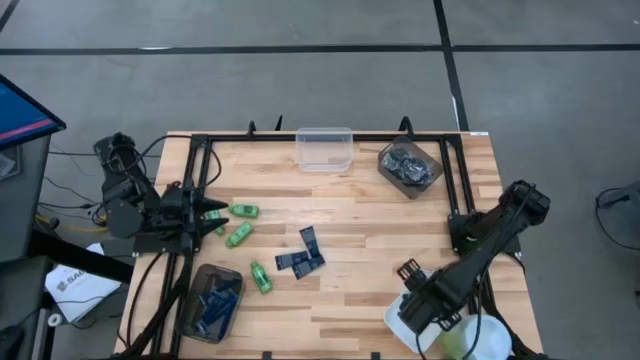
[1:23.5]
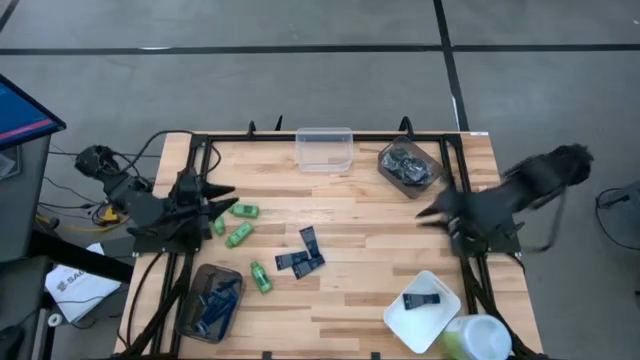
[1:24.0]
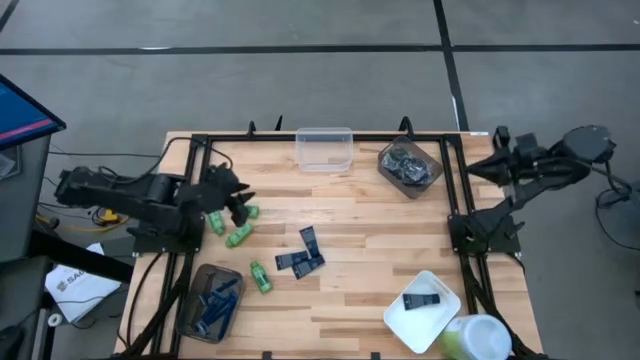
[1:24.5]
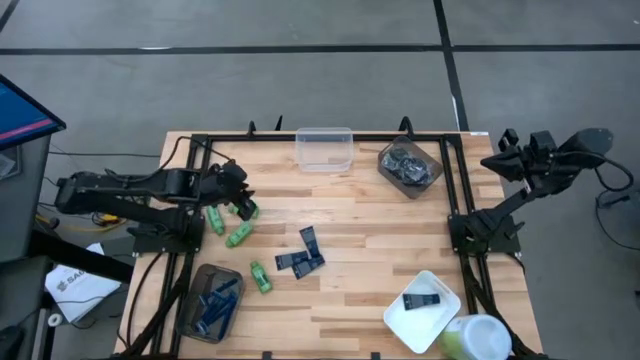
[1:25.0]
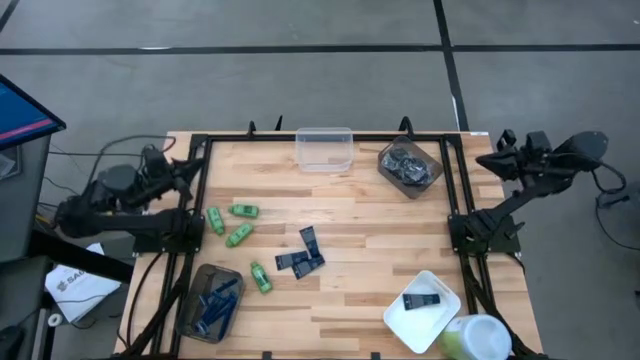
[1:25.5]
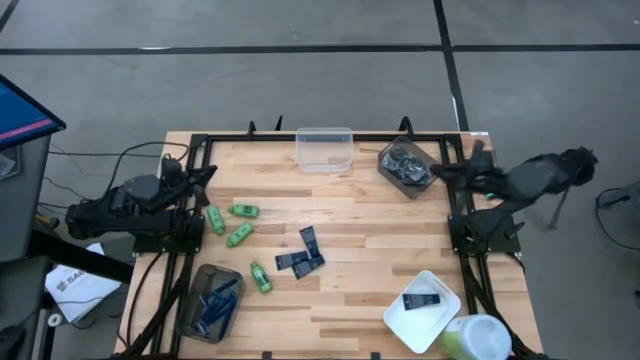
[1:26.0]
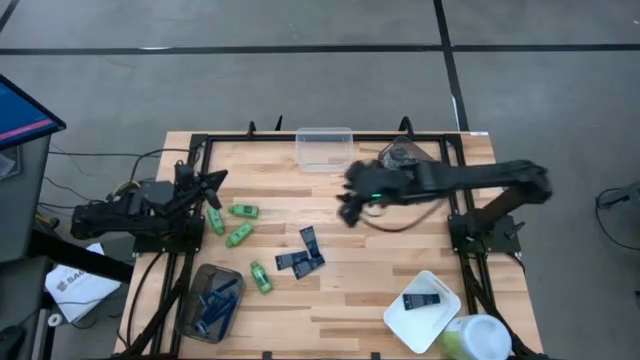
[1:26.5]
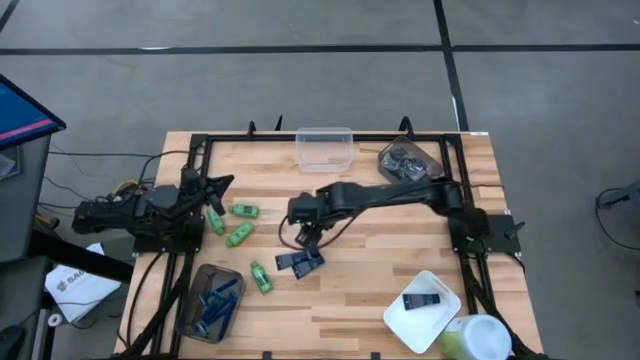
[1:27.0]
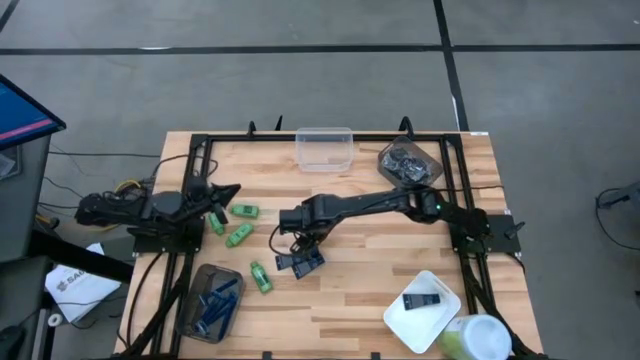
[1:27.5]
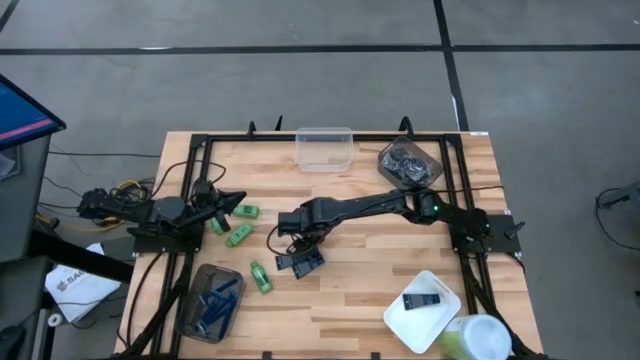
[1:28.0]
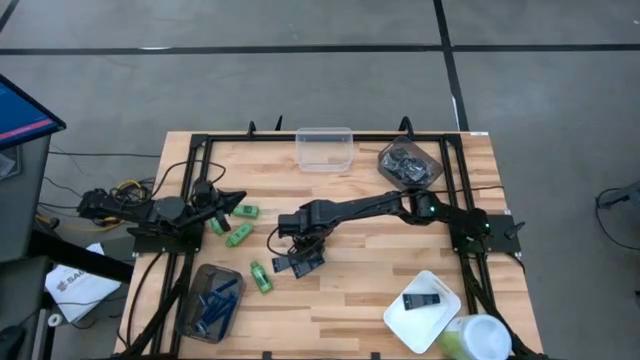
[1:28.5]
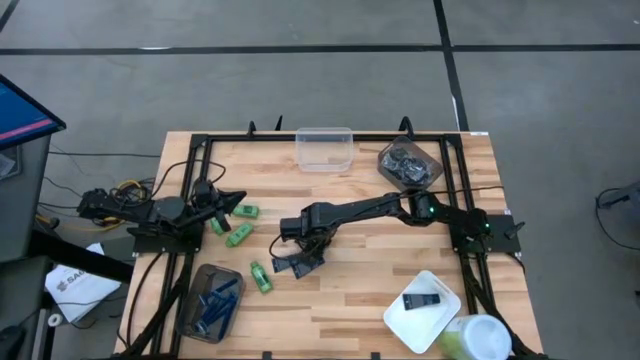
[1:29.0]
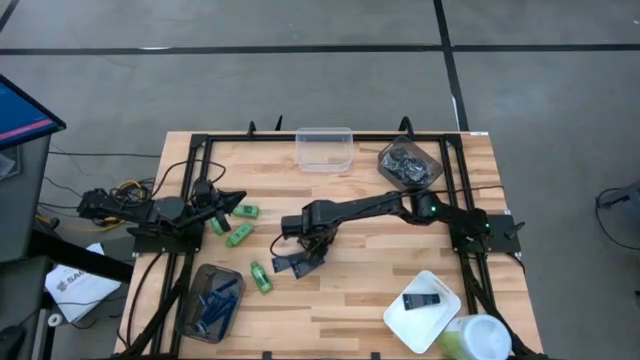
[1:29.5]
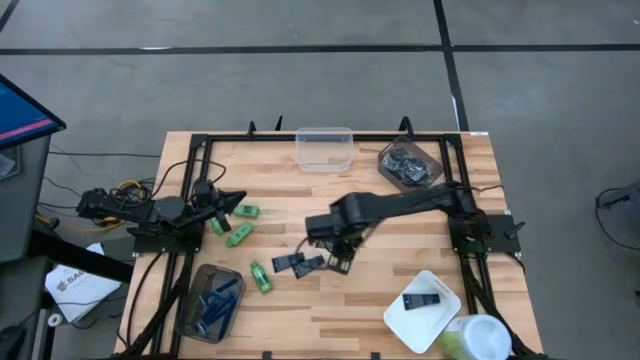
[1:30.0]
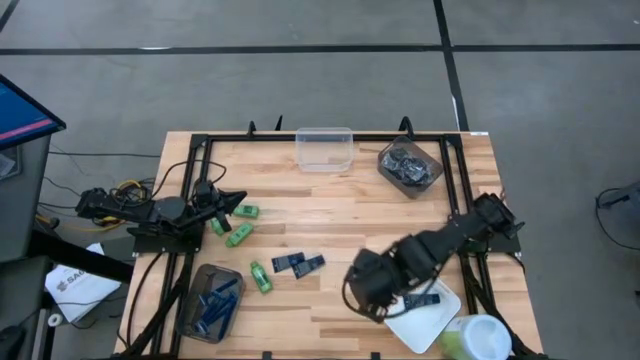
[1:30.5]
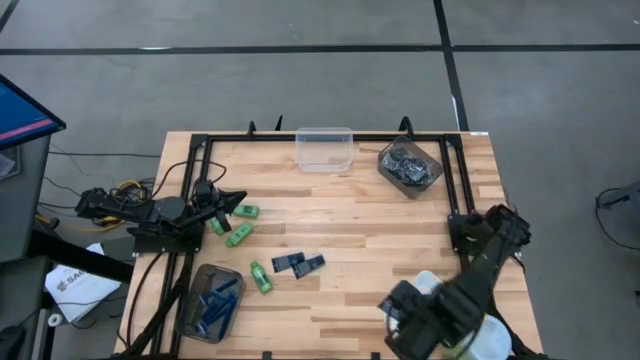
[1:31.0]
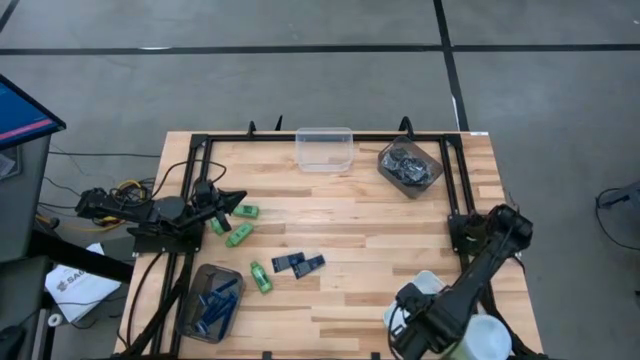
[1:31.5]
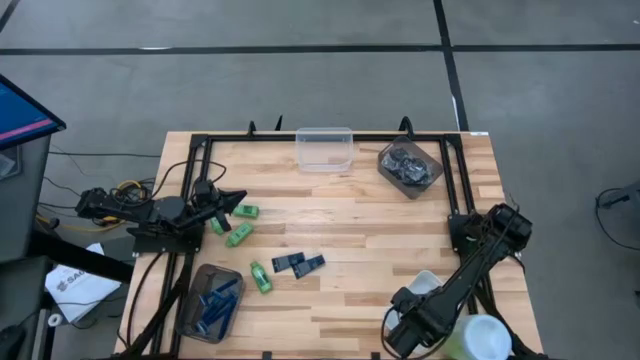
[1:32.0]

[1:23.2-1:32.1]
Task: Pick & Place Travel size toiletries
Put the blue shave cream into the white bin

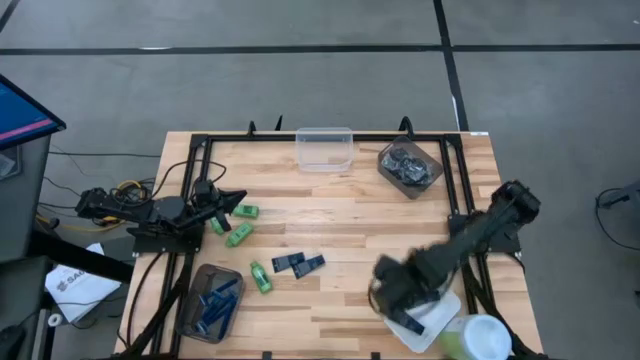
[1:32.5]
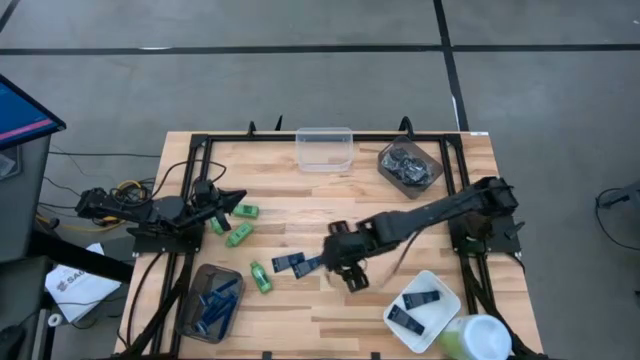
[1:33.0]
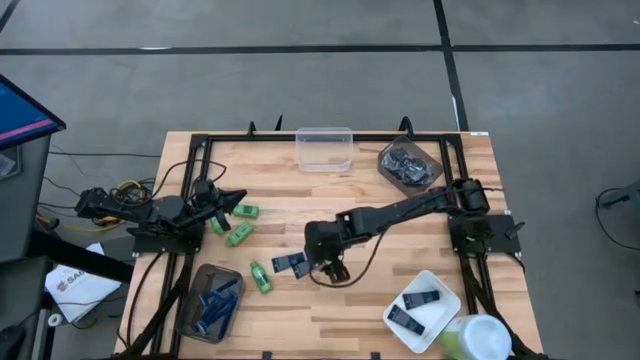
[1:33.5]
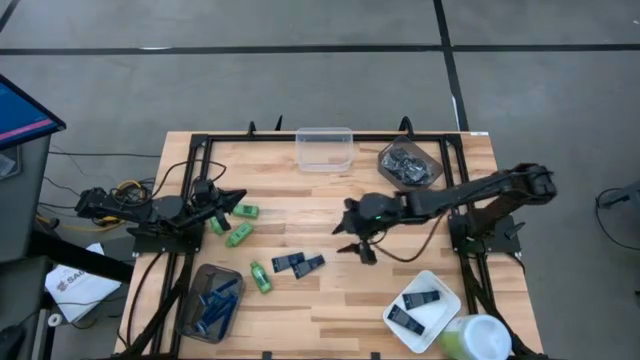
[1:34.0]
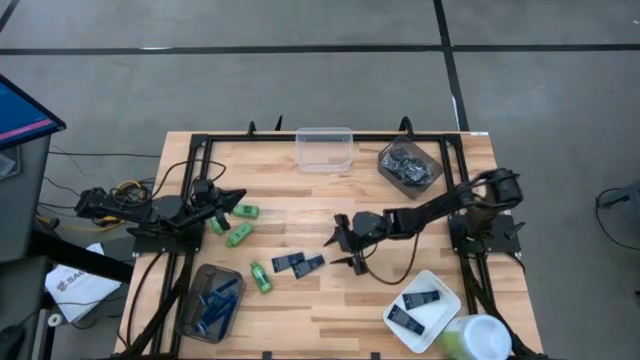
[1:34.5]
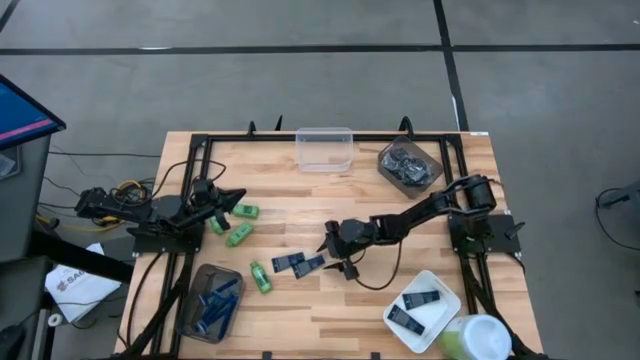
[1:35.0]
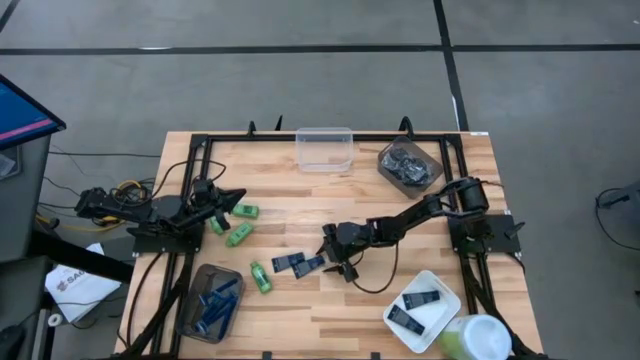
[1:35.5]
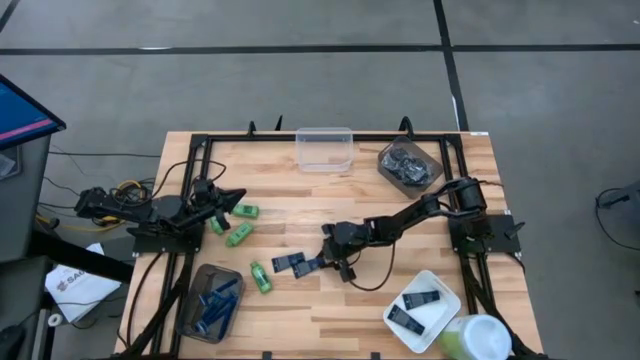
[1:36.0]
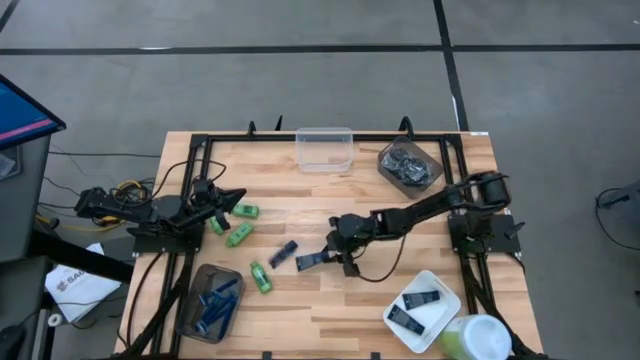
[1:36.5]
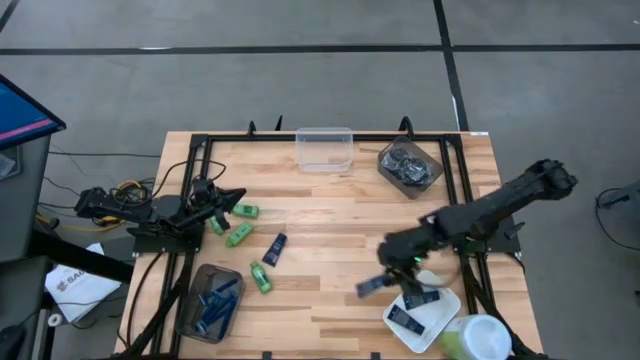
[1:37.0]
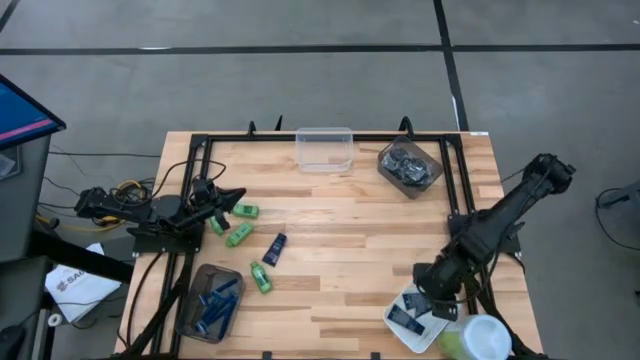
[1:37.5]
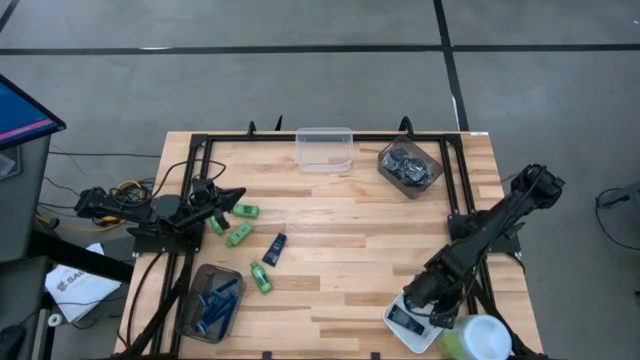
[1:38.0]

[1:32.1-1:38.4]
Put the blue shave cream into the white bin

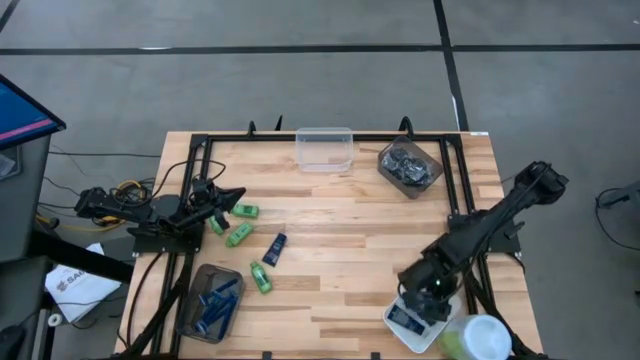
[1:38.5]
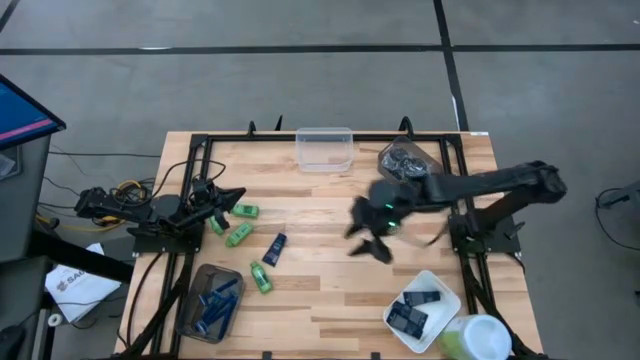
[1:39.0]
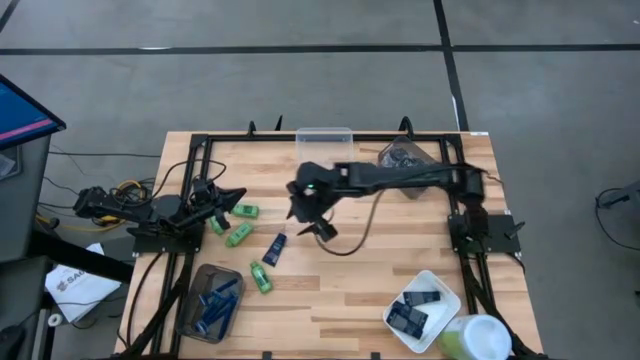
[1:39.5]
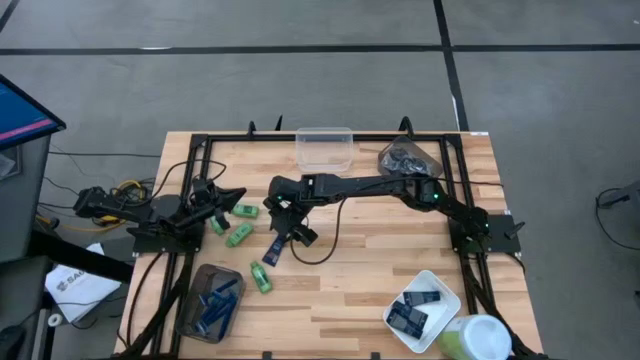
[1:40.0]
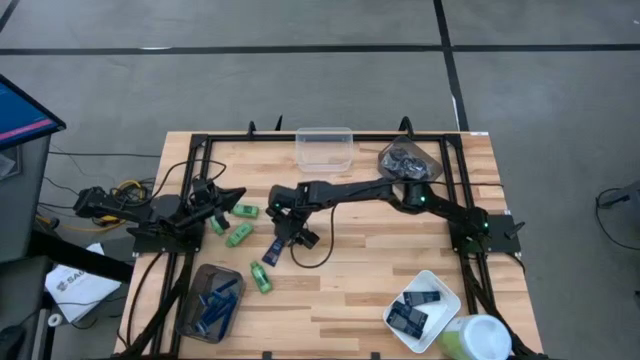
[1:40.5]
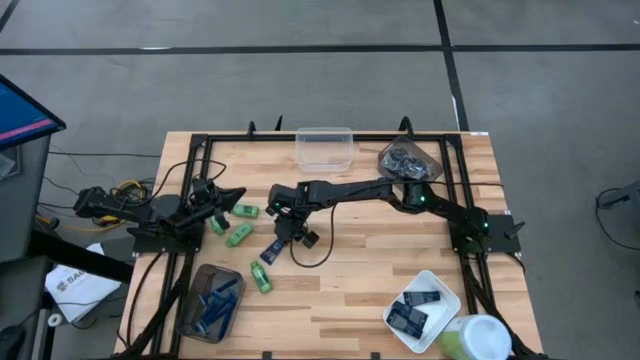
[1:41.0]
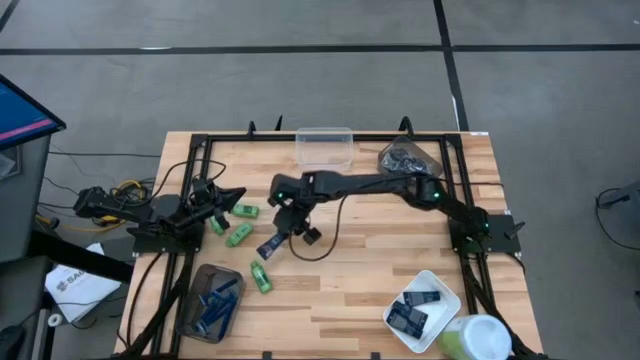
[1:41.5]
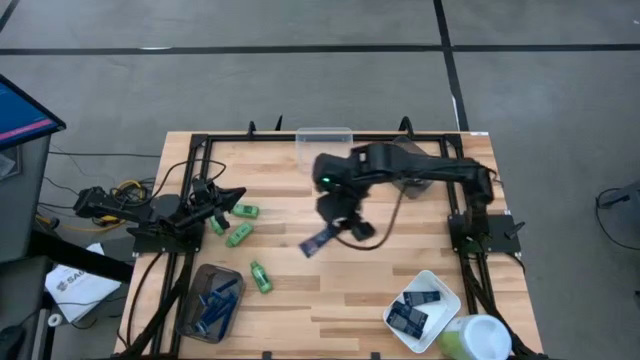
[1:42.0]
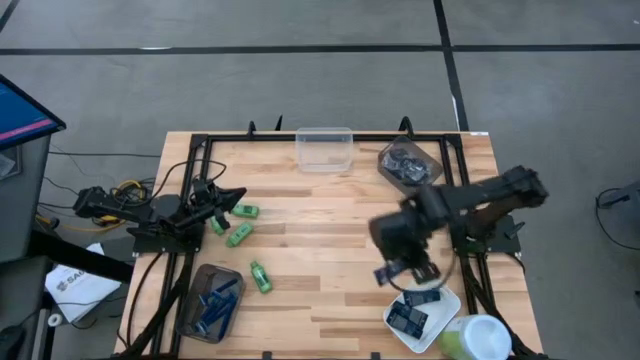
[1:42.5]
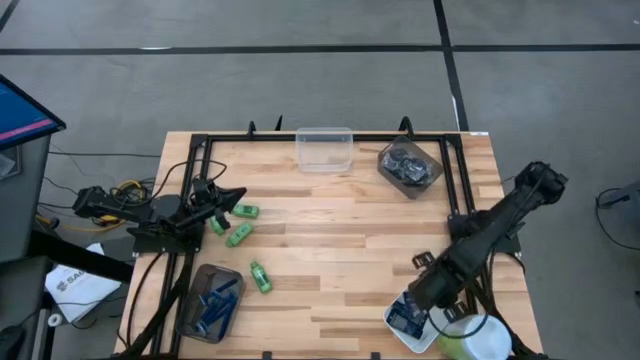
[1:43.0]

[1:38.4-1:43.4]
Put the blue shave cream into the white bin

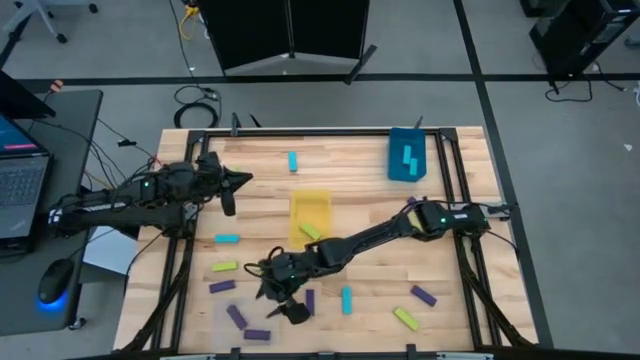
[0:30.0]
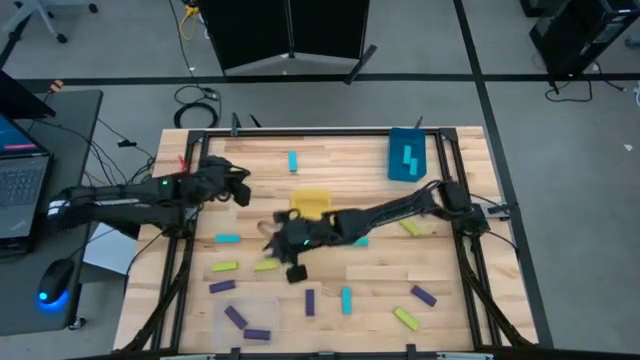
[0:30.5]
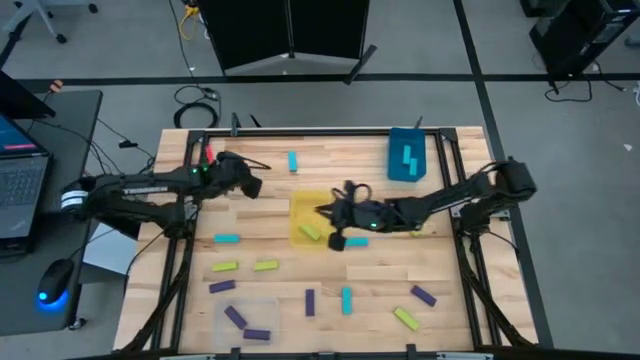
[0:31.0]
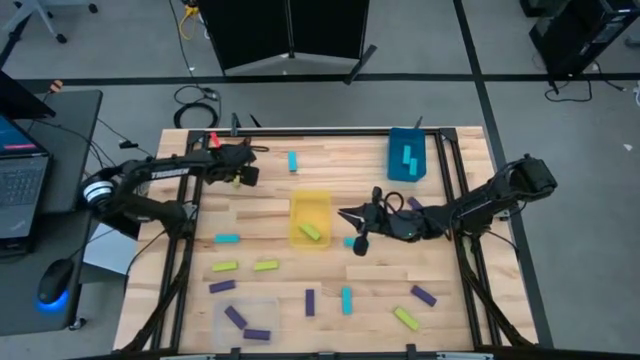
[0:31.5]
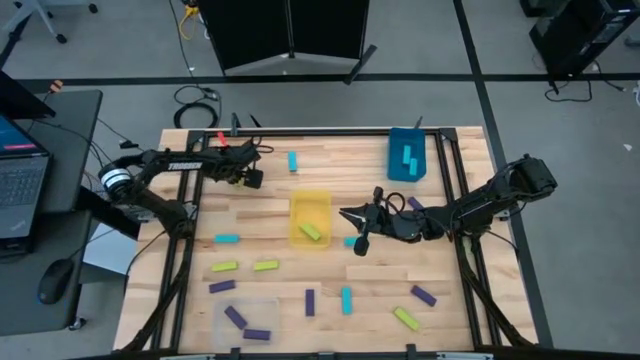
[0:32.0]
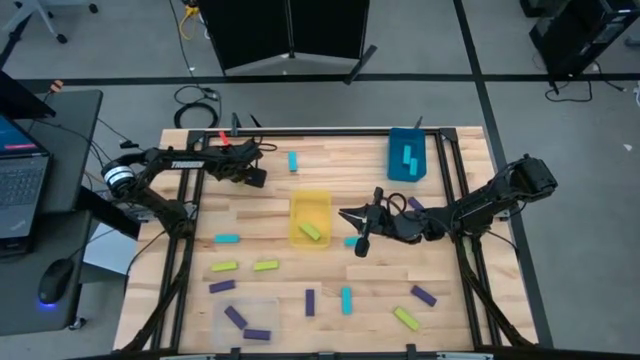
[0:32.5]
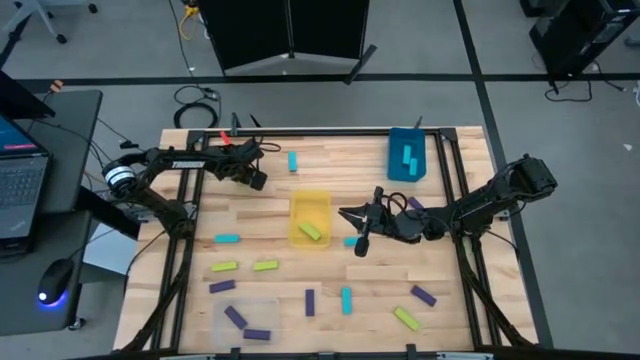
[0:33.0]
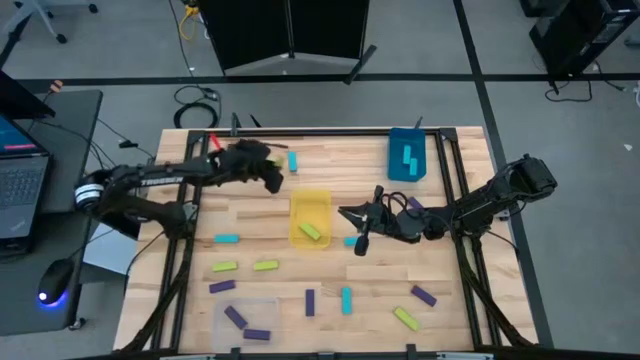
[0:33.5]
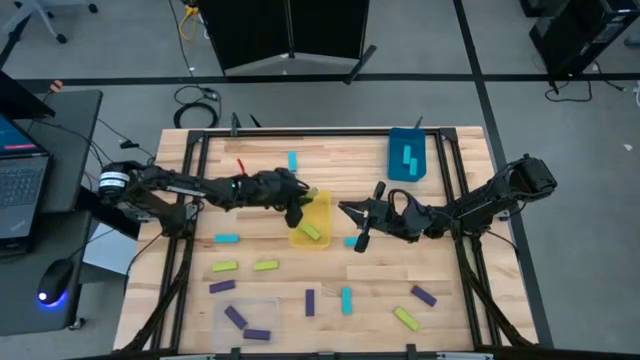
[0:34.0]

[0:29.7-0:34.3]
Task: Sort blocks
Put the light green block into the yellow bin
